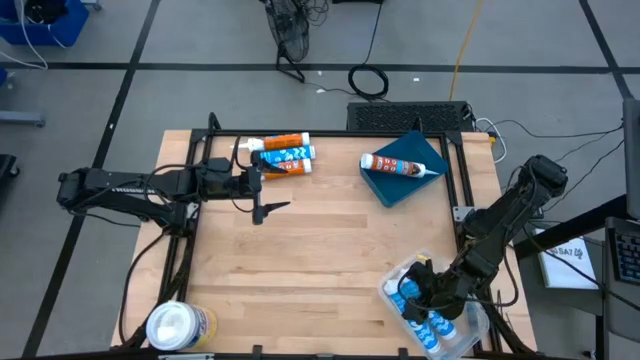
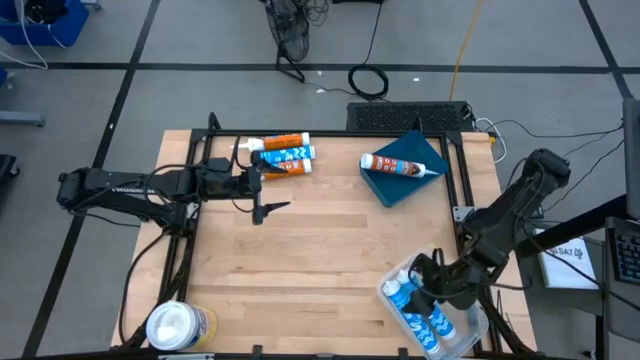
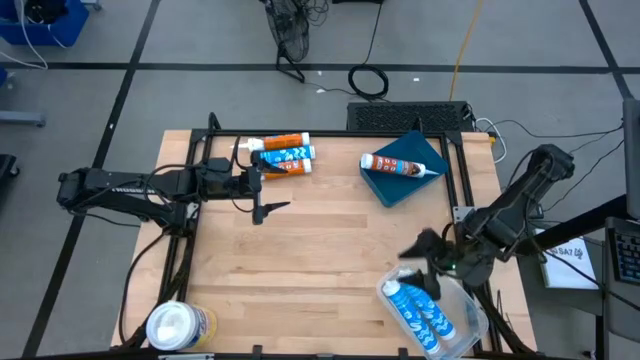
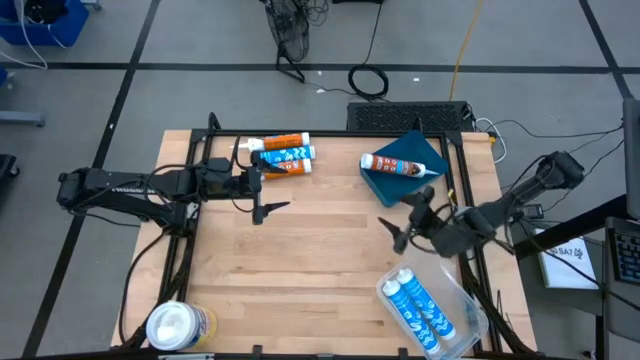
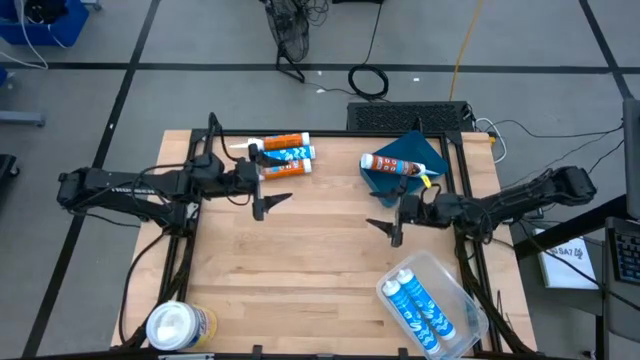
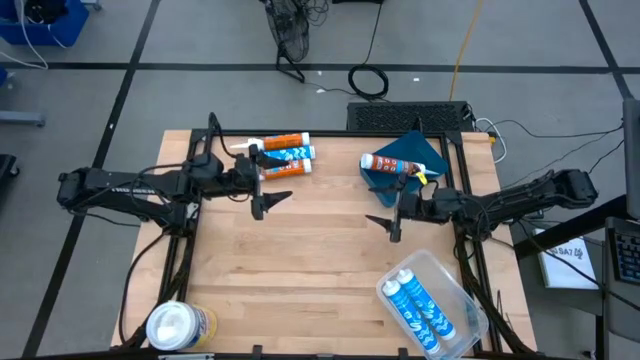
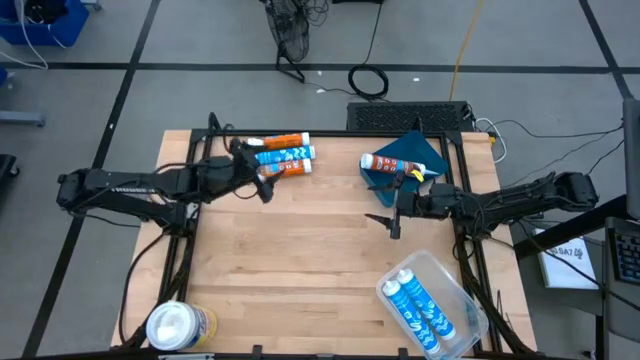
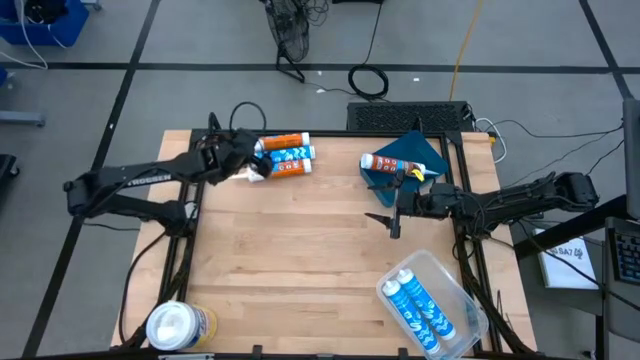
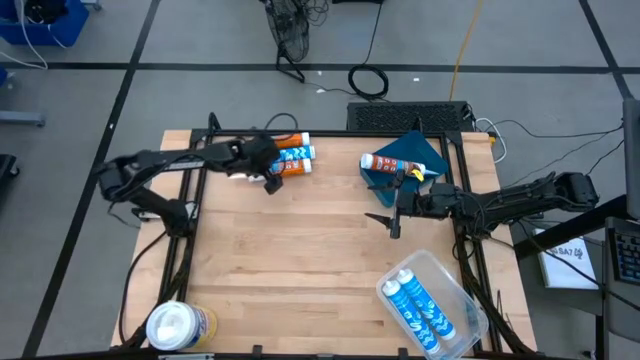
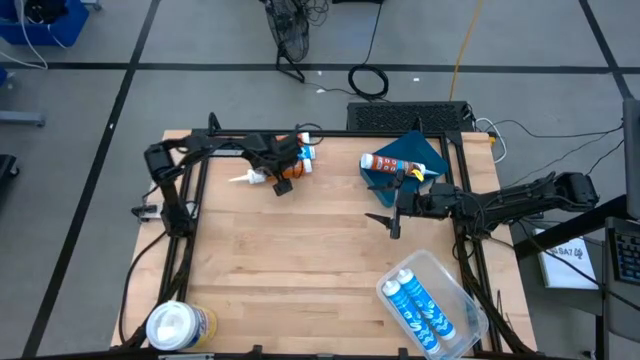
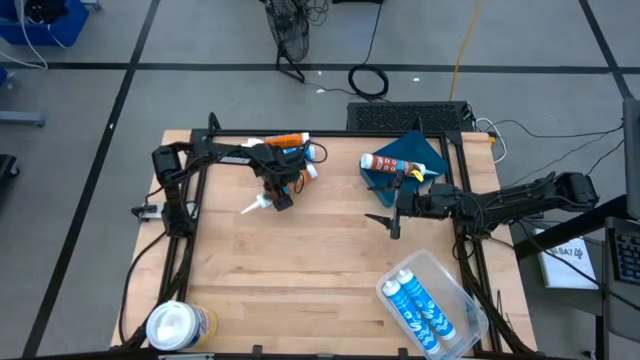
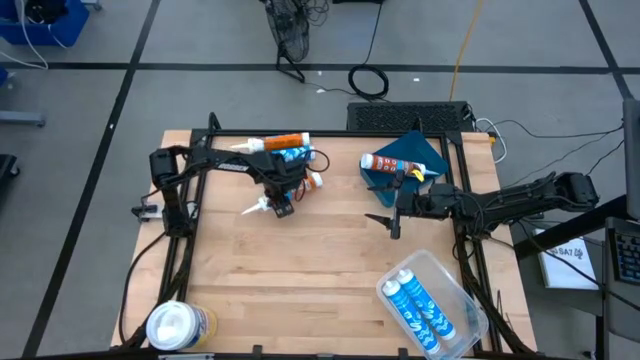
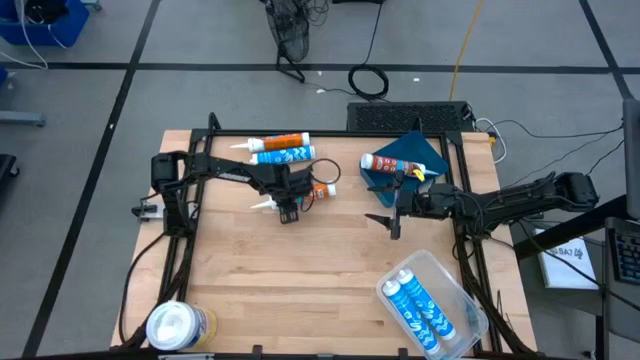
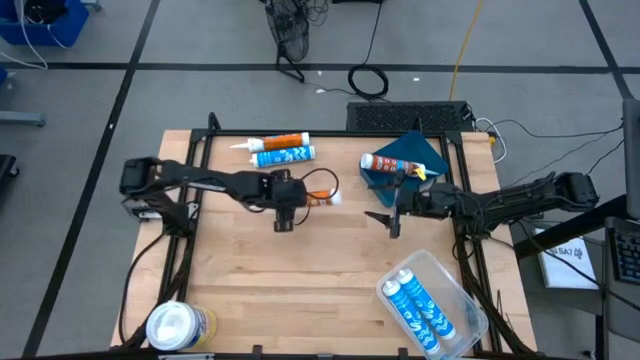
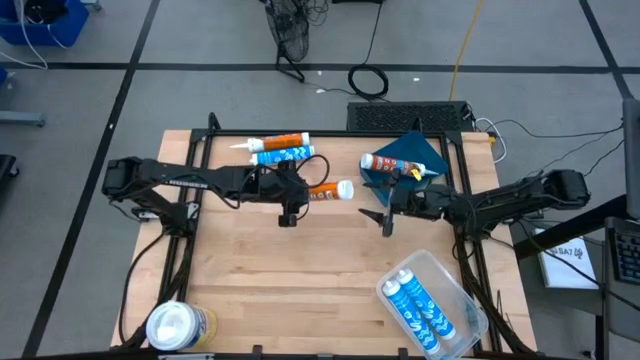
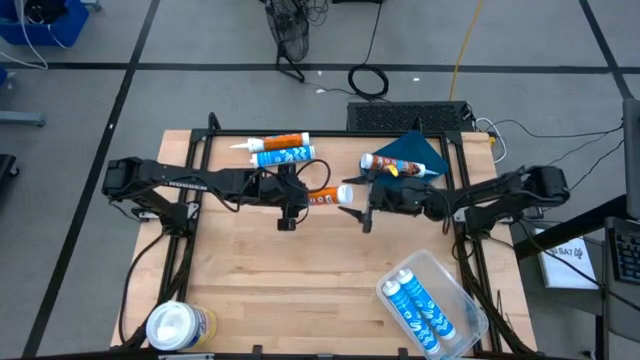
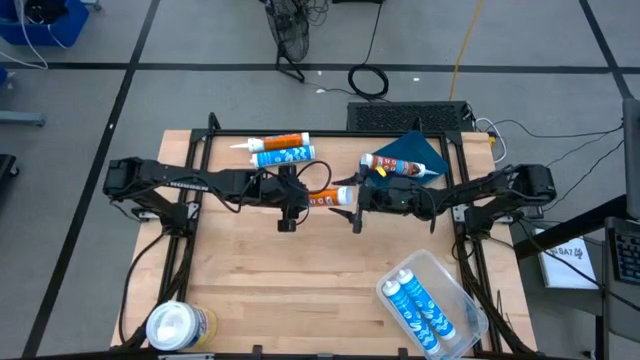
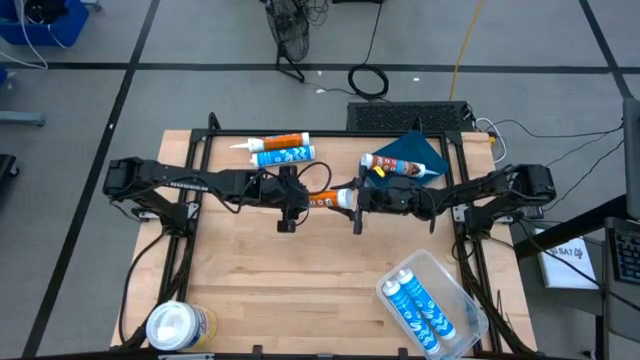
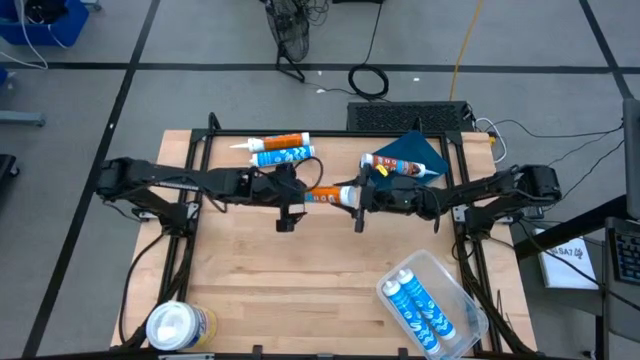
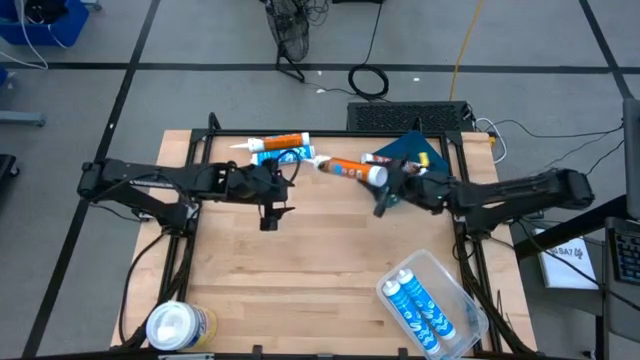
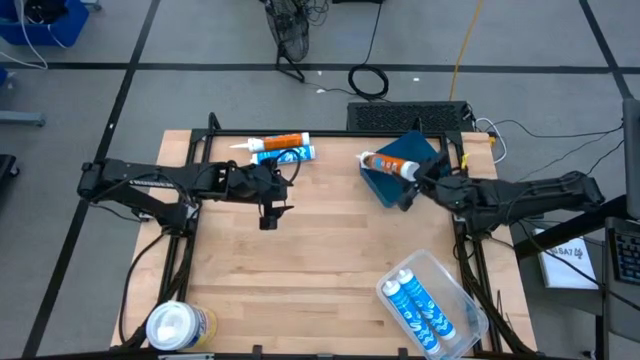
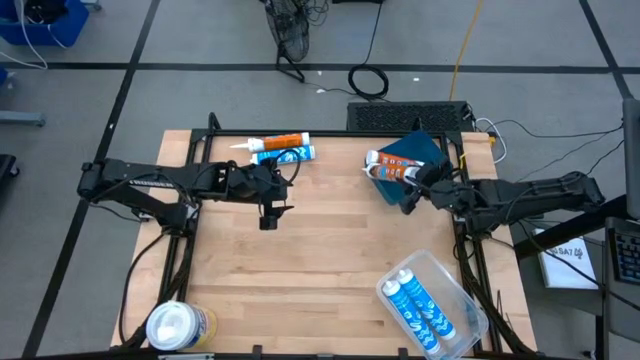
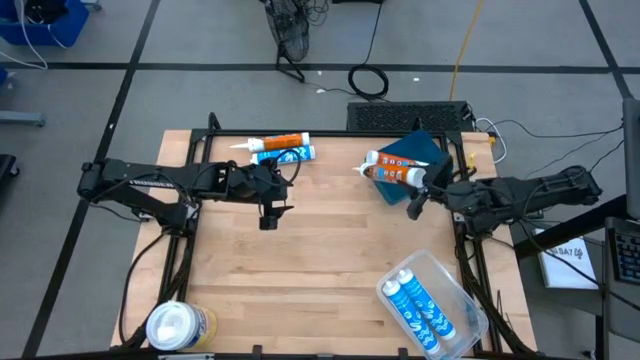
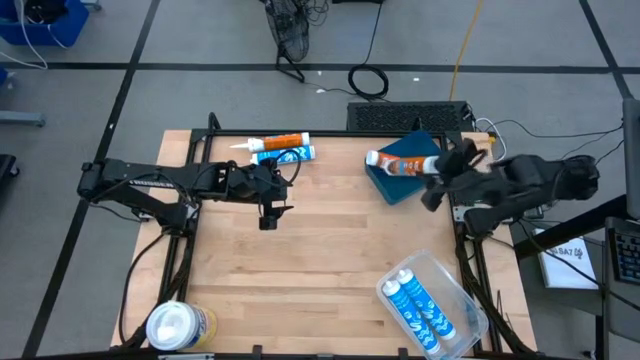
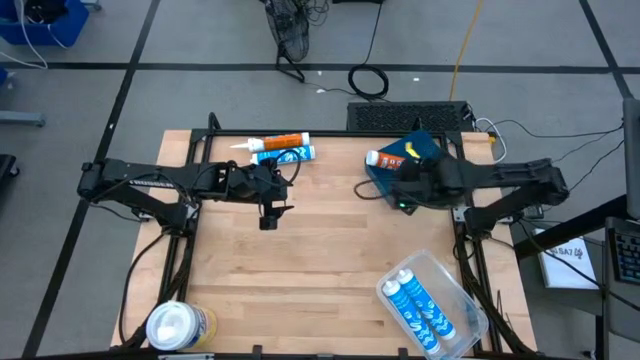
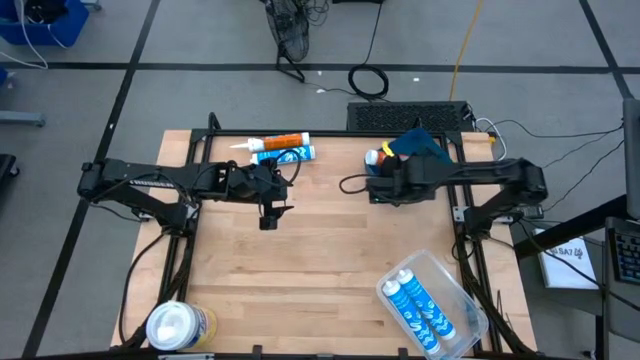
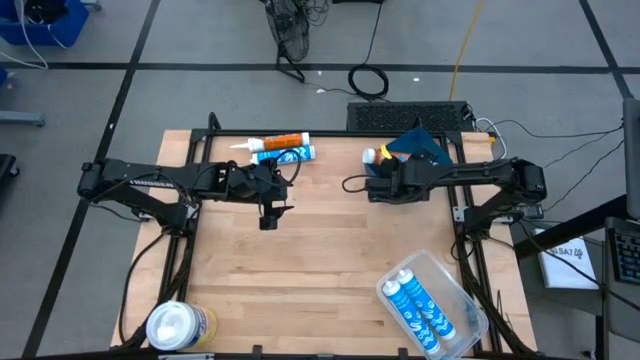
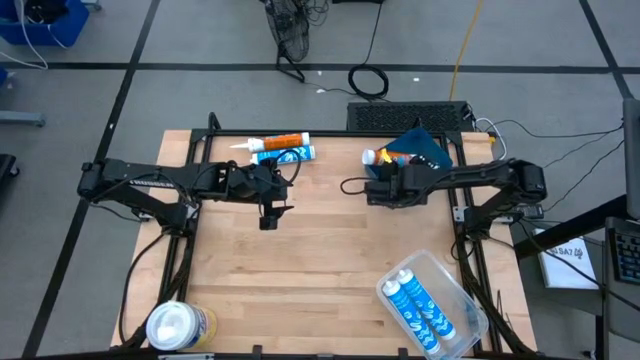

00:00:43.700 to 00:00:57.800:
Task: Pick & place silicon tubes, Sealant and Lysol wipes
Put the bottom orange sealant into the blue bin

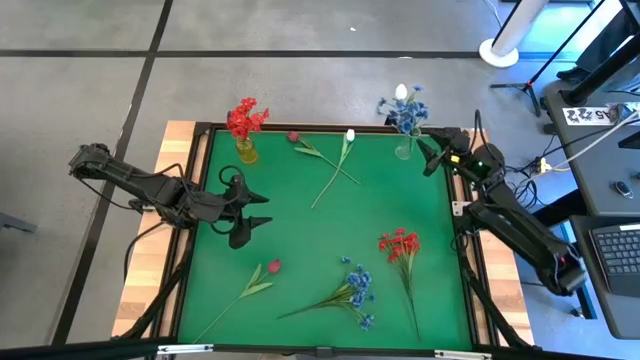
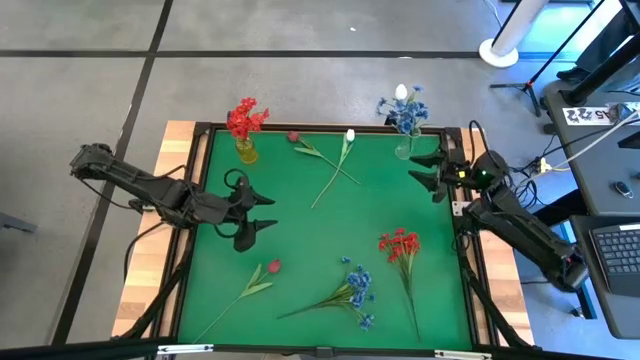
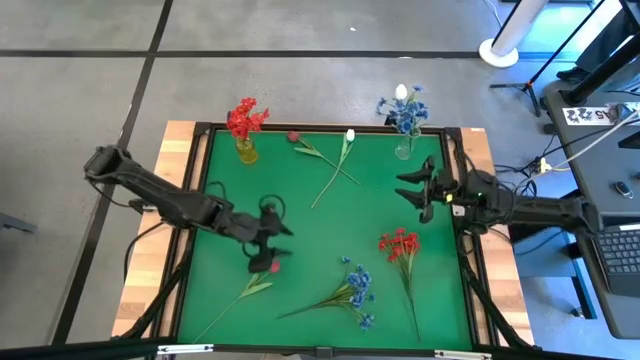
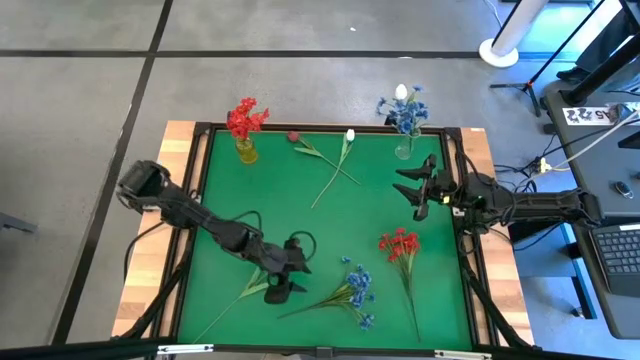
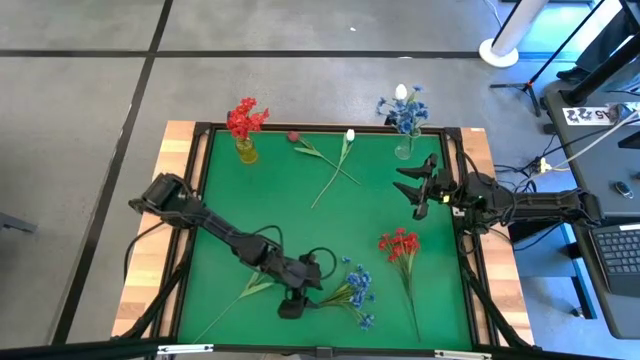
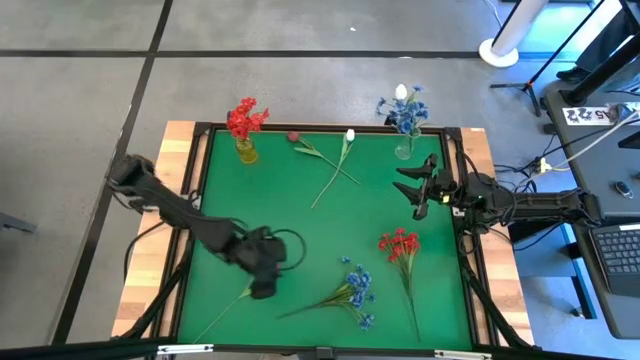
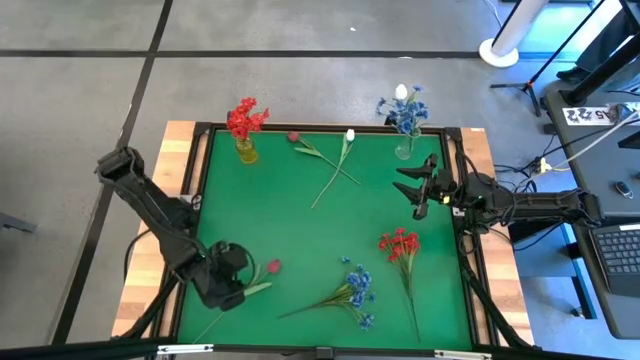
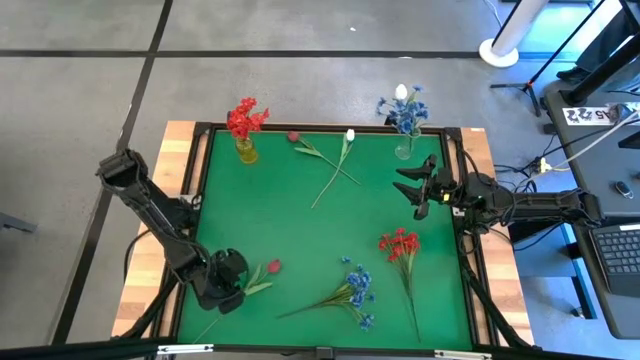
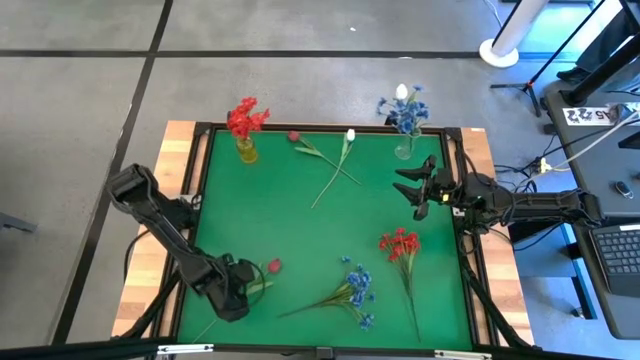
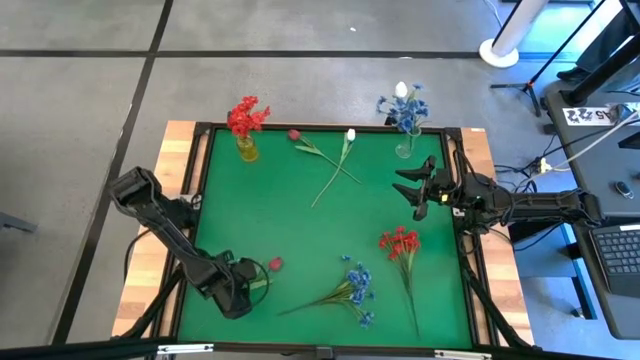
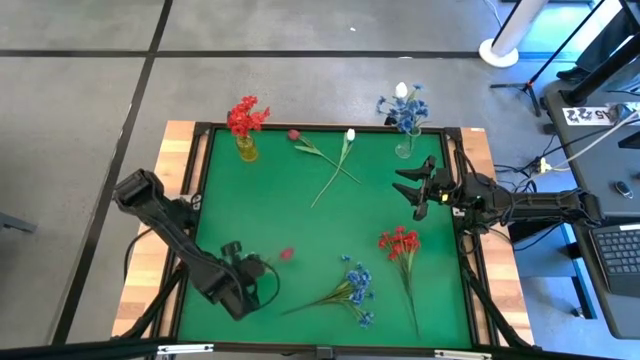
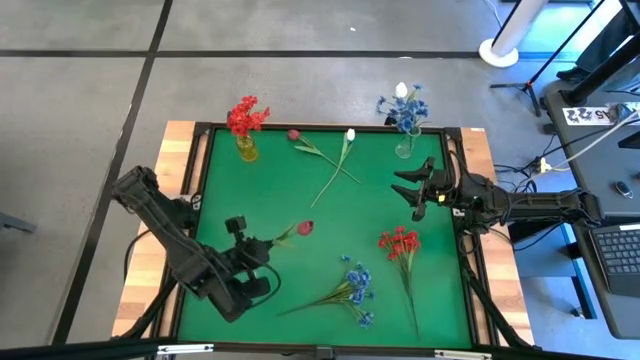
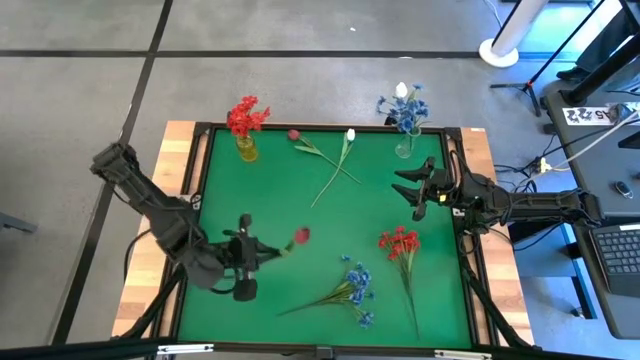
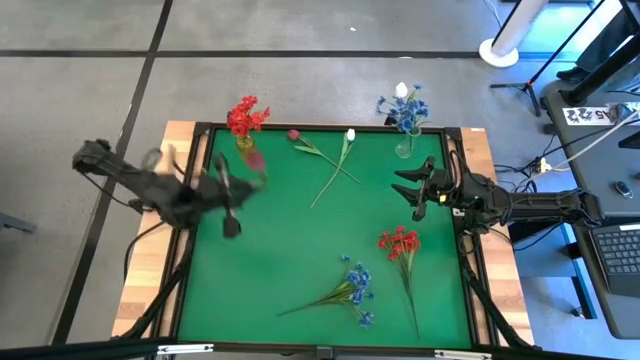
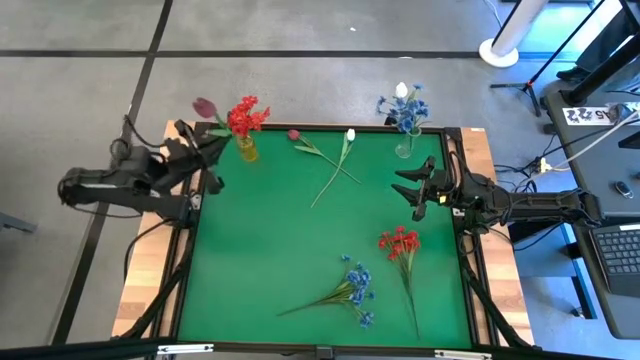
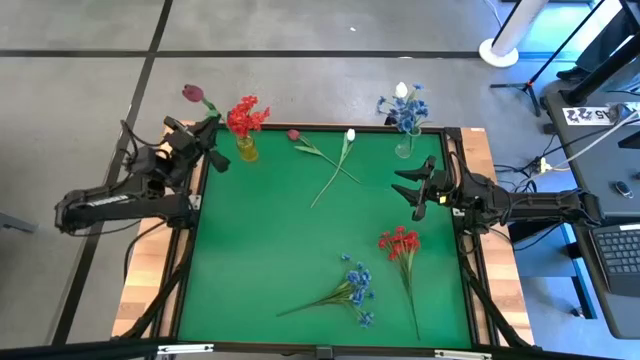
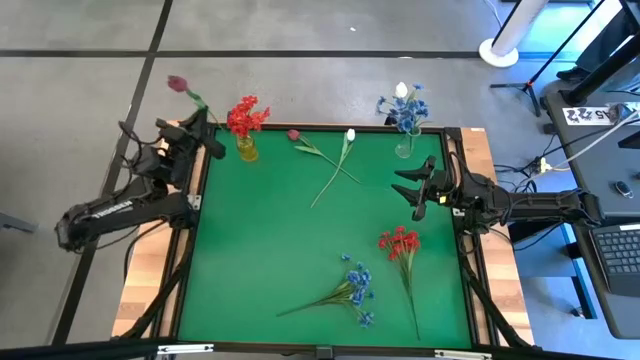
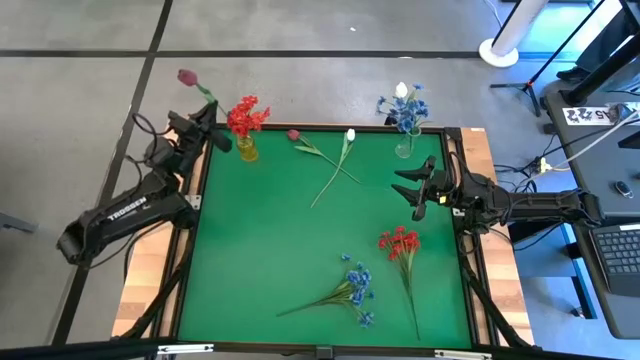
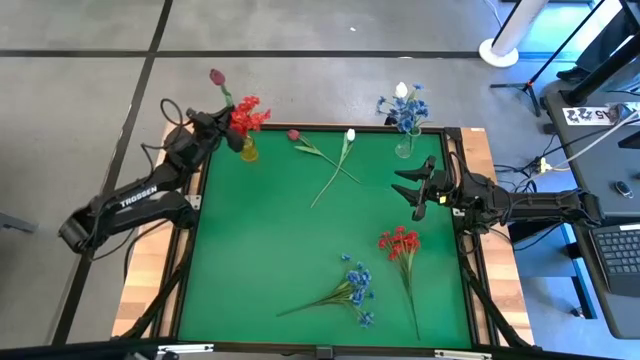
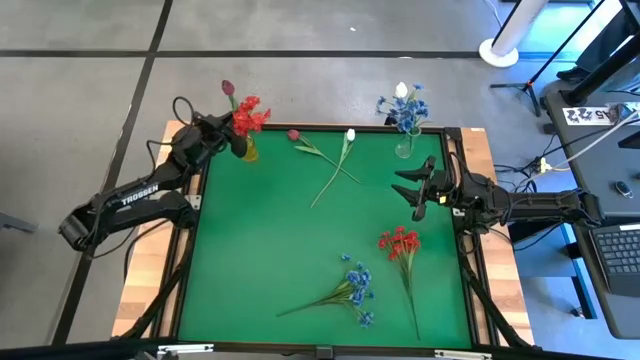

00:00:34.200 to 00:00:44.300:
Task: Sort flowers into vase by color
Put the bottom red flower into the yellow vase
